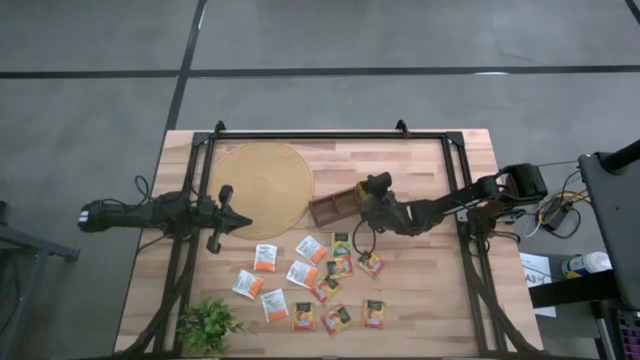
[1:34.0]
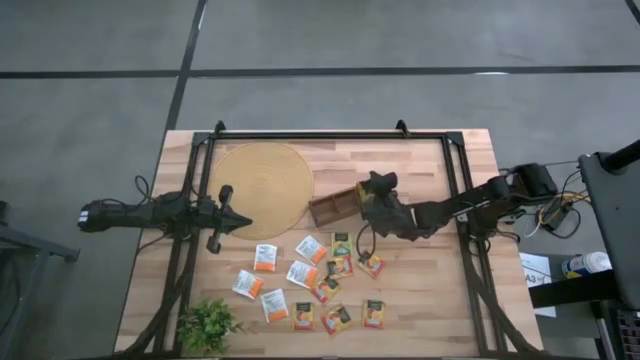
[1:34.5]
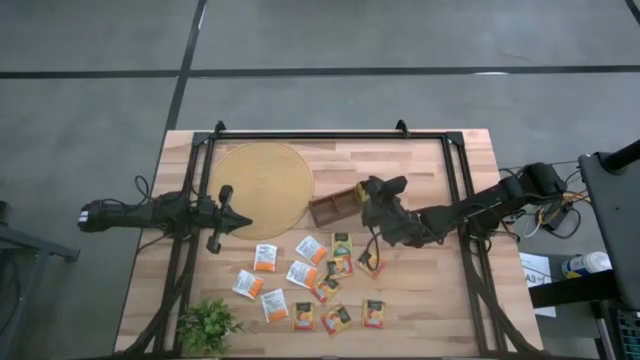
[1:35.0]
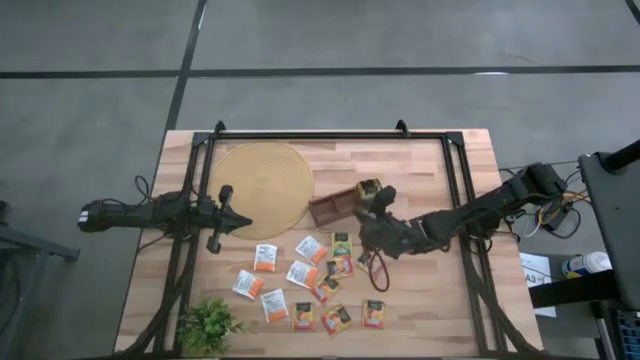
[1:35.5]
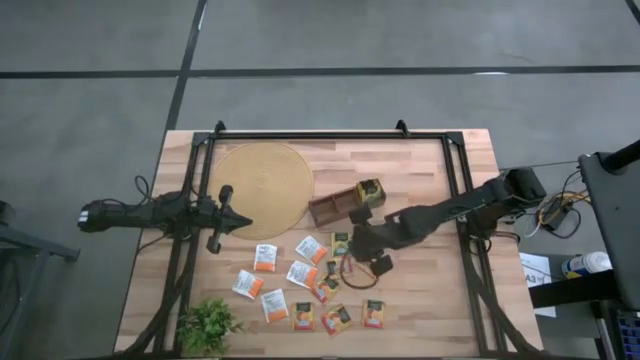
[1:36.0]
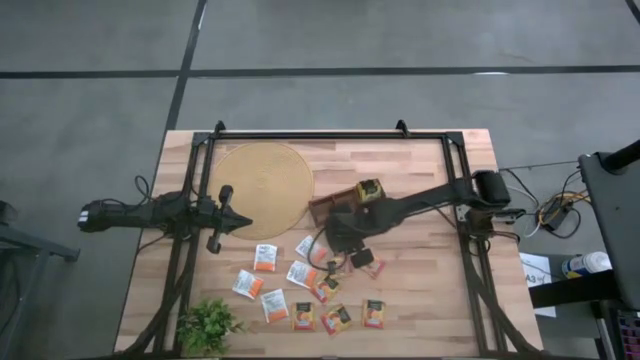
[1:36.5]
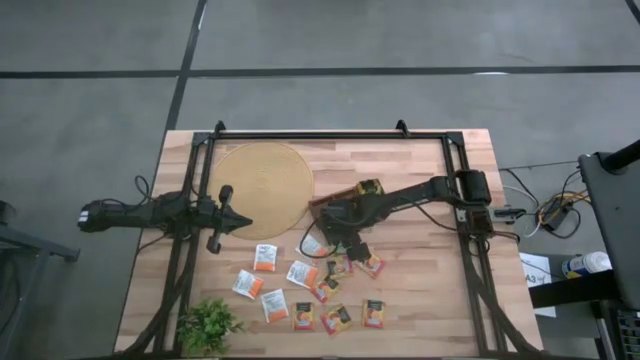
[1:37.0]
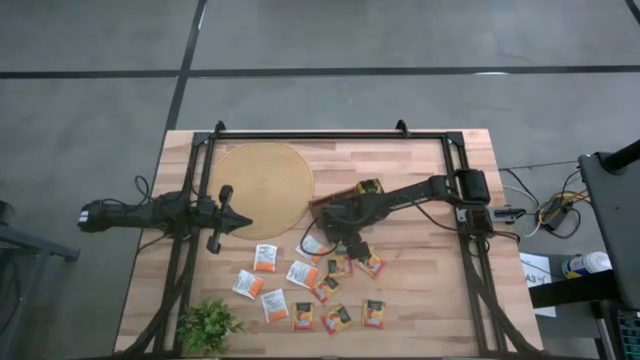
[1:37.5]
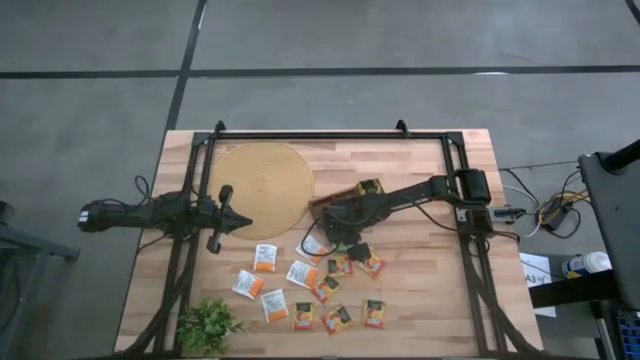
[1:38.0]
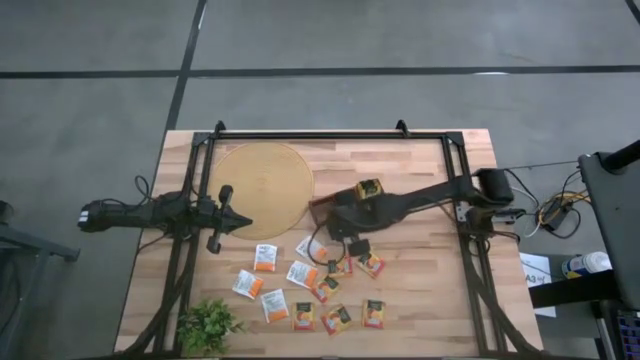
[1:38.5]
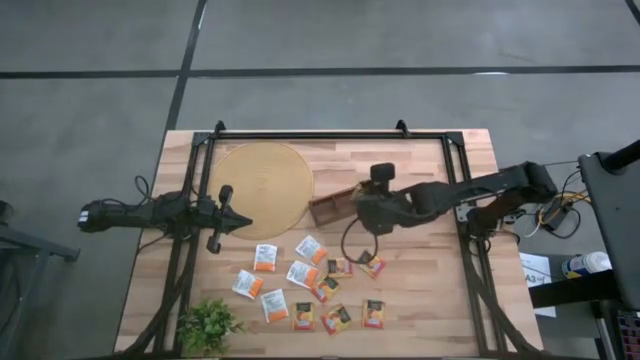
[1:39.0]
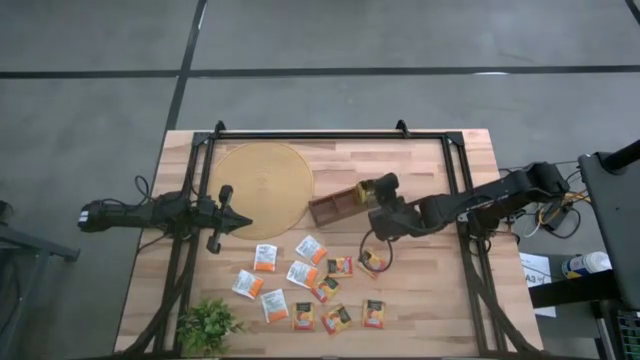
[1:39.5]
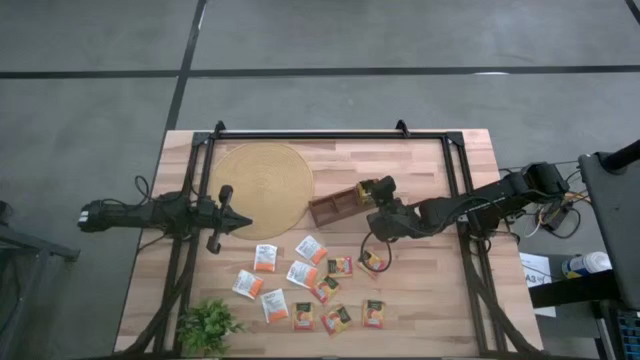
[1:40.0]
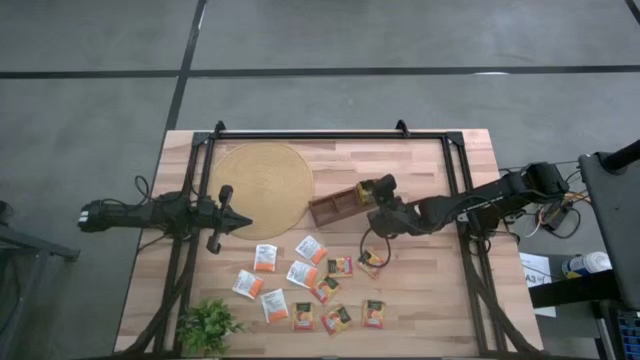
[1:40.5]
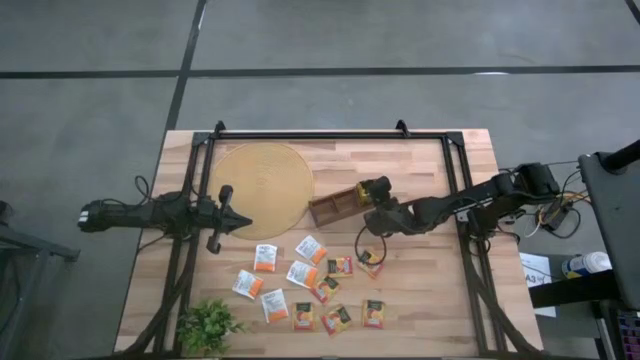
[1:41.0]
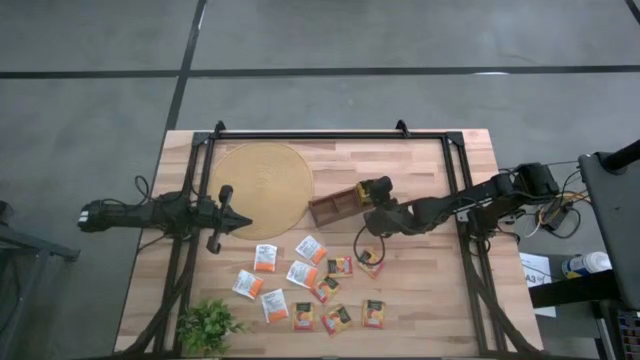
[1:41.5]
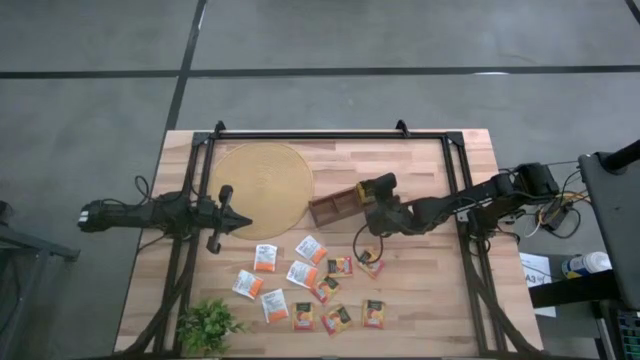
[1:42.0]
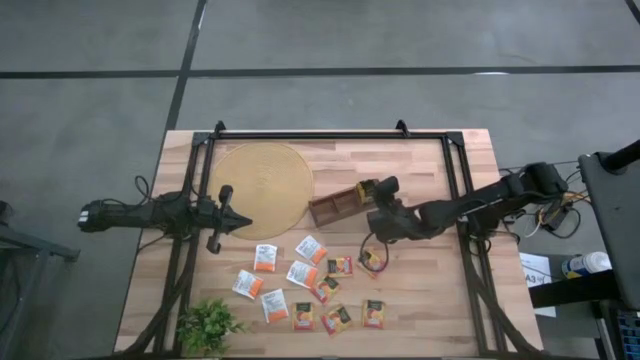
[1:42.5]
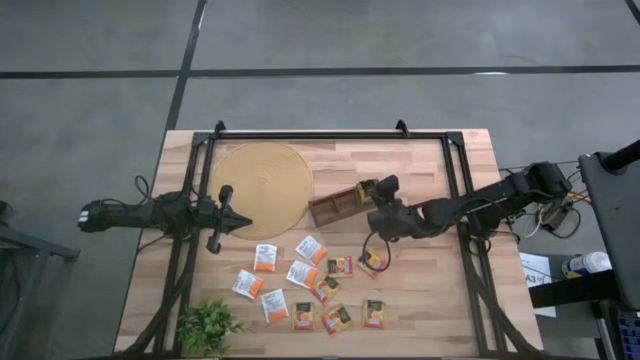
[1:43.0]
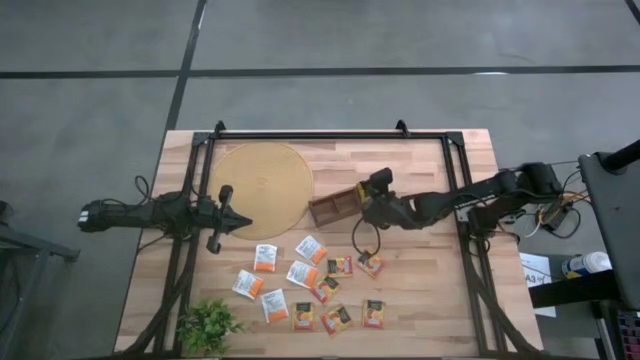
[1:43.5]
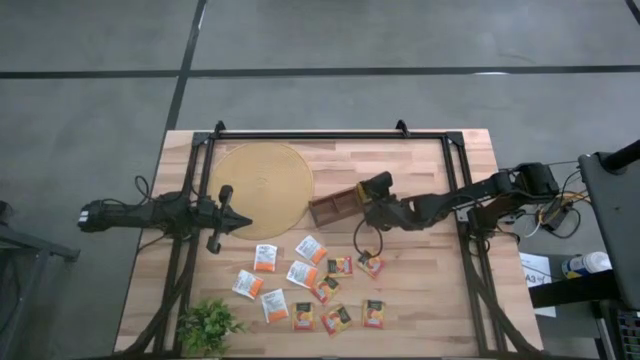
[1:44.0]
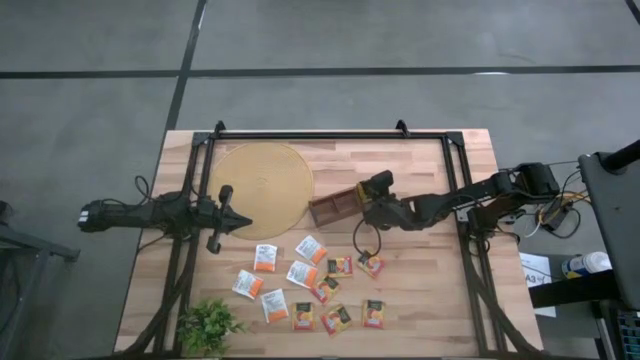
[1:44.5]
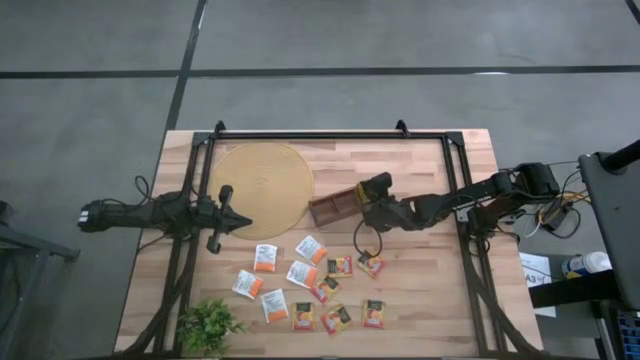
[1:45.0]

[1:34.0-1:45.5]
Task: Pick & Place Tea
Put the yellow tea bag into the right section of the wooden organizer

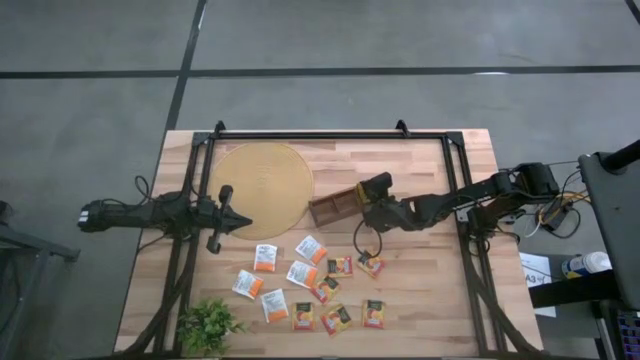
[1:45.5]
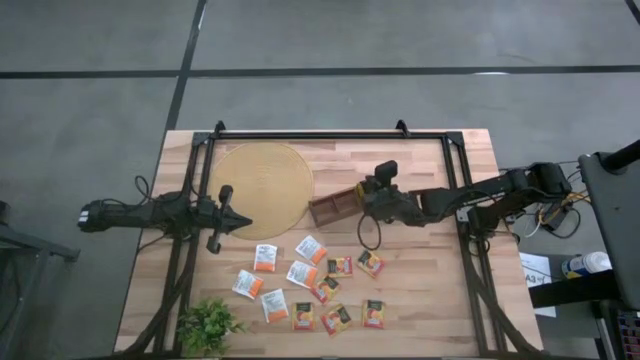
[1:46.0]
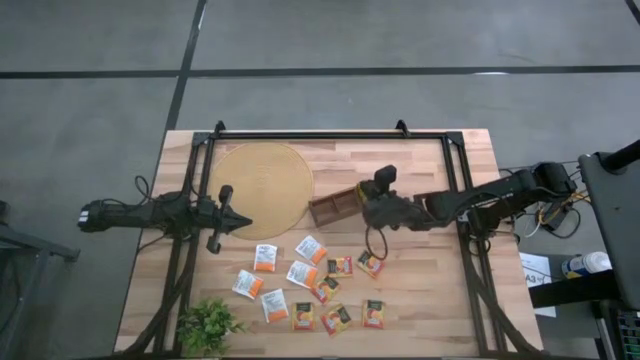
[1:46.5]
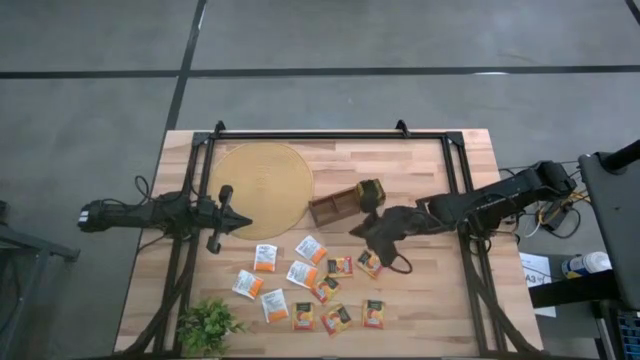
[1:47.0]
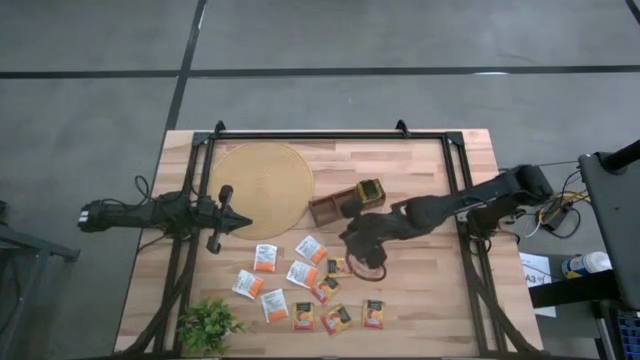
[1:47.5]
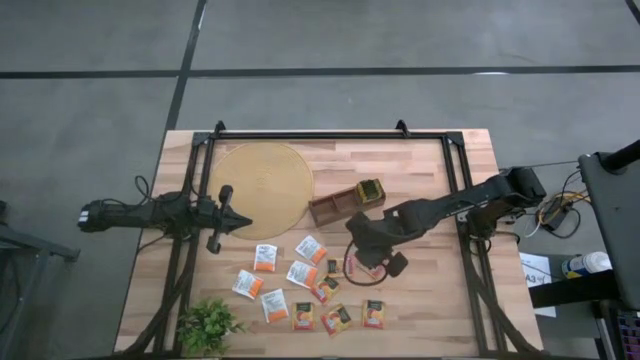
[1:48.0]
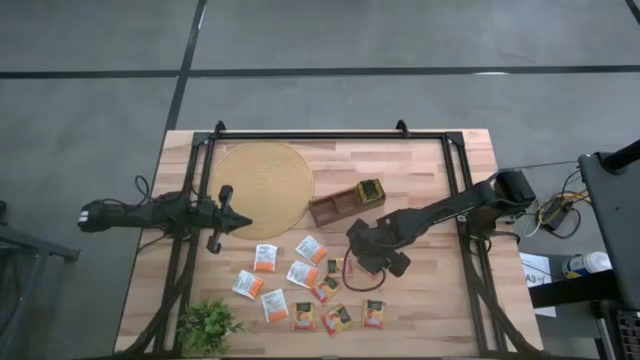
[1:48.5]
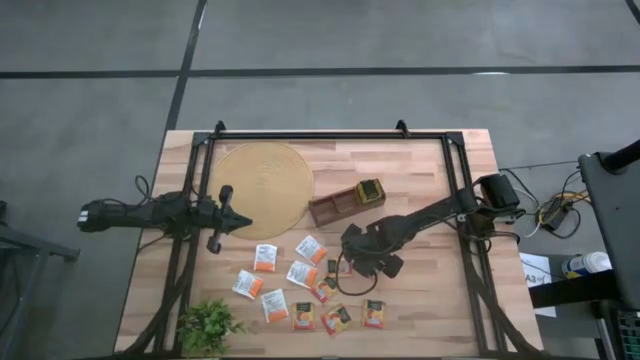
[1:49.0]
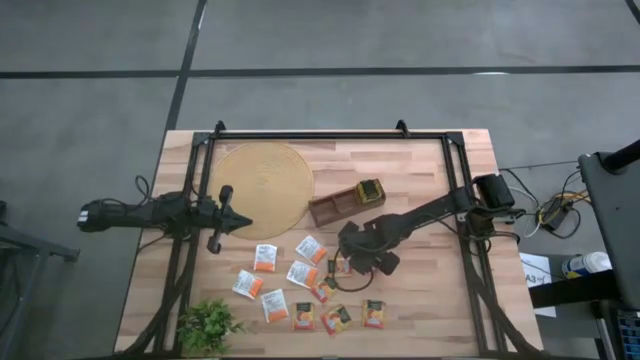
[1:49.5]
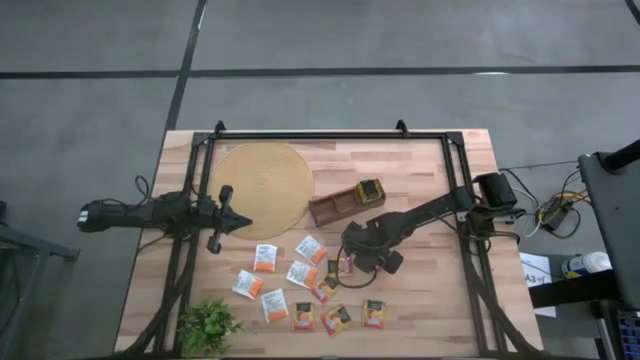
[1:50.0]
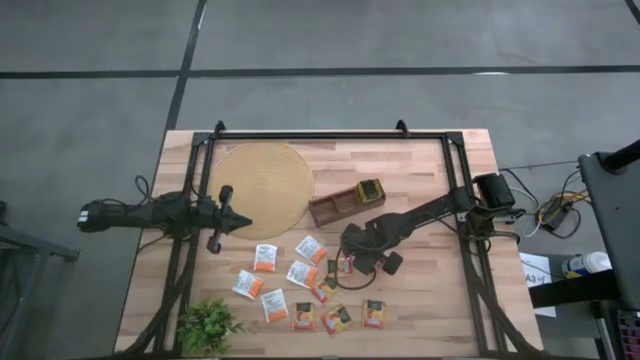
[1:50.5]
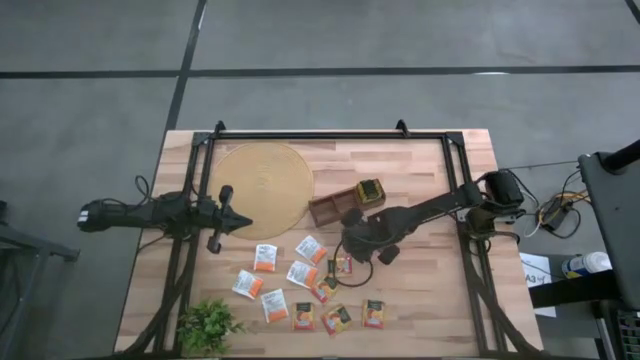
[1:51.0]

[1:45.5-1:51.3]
Put the orange tea bag into the middle section of the wooden organizer
